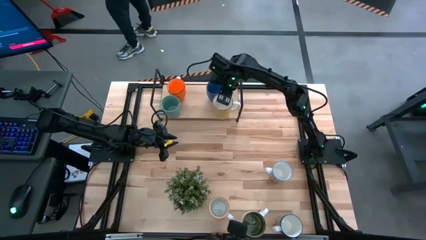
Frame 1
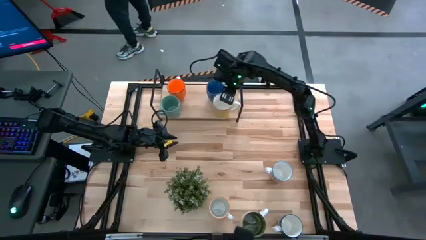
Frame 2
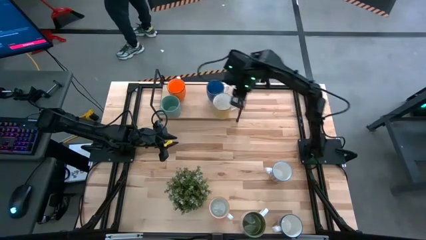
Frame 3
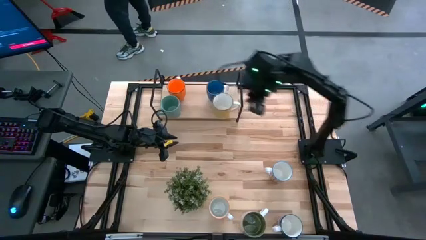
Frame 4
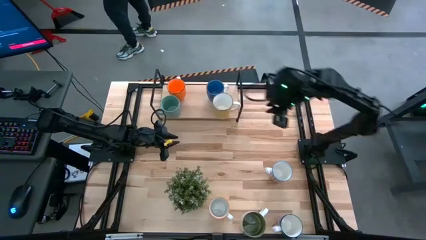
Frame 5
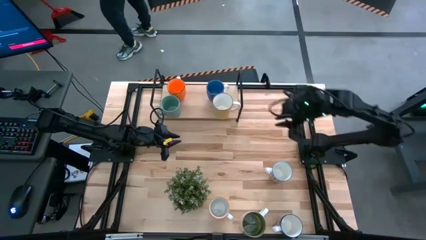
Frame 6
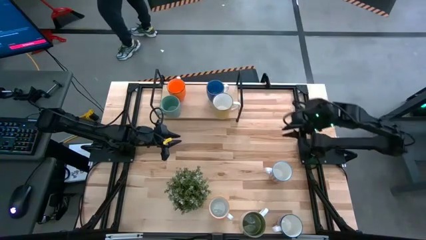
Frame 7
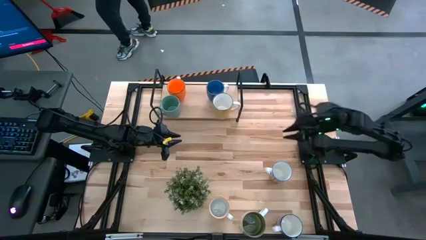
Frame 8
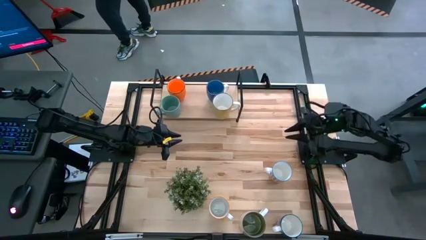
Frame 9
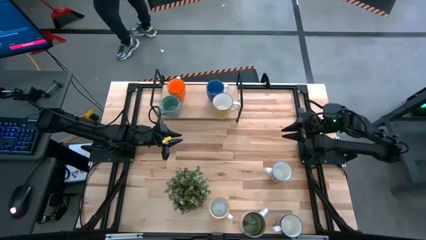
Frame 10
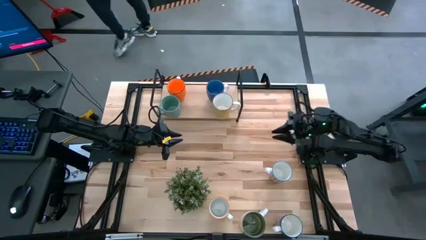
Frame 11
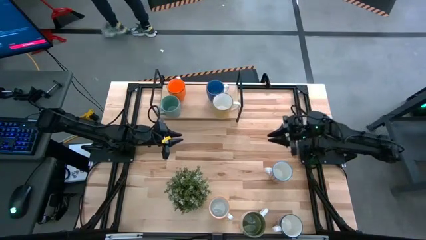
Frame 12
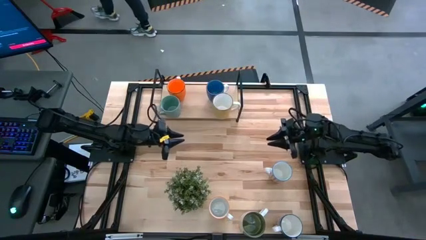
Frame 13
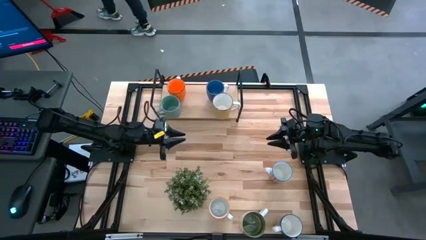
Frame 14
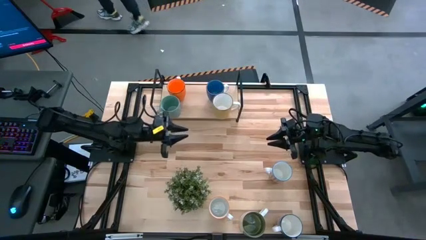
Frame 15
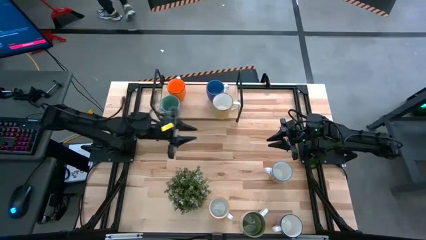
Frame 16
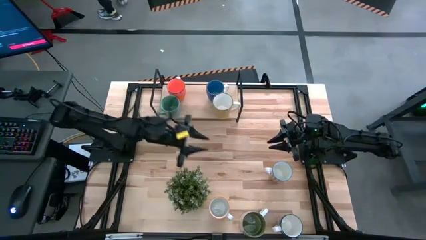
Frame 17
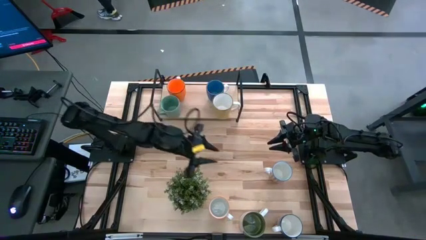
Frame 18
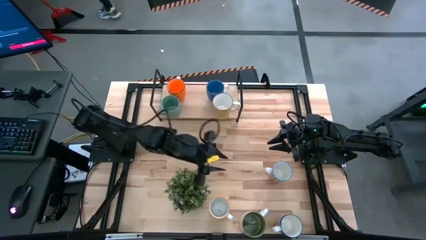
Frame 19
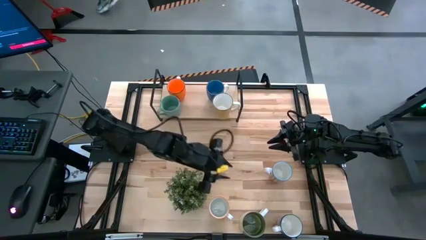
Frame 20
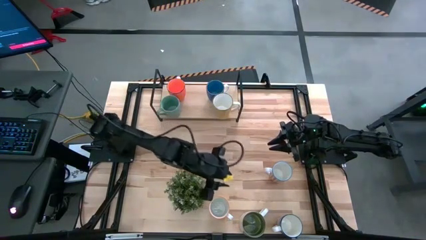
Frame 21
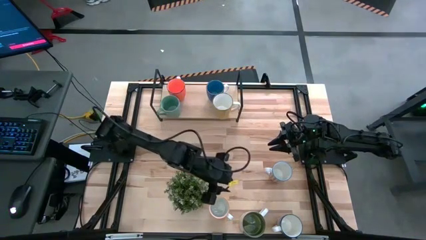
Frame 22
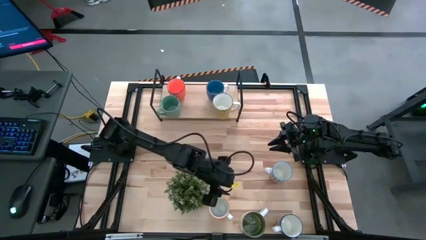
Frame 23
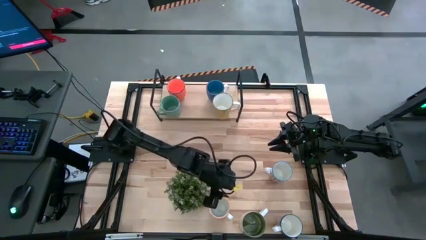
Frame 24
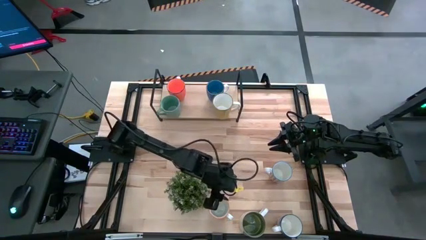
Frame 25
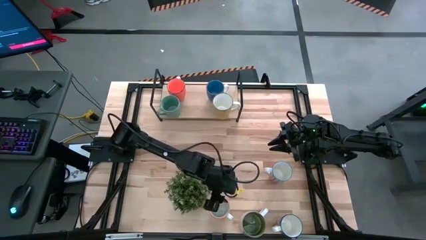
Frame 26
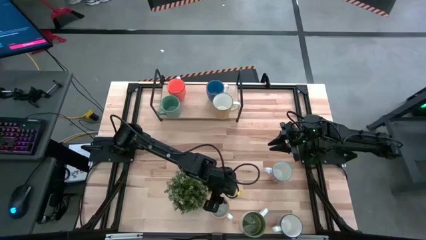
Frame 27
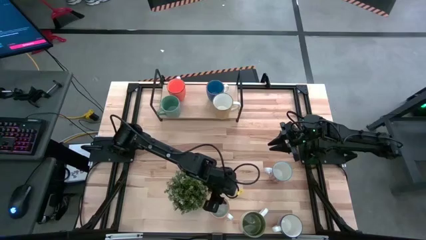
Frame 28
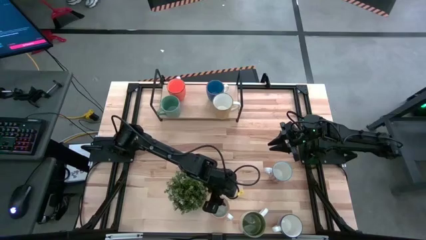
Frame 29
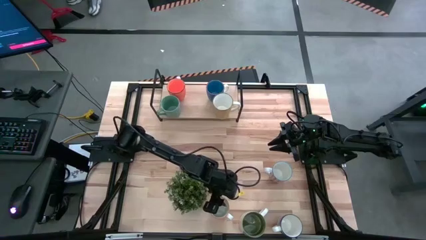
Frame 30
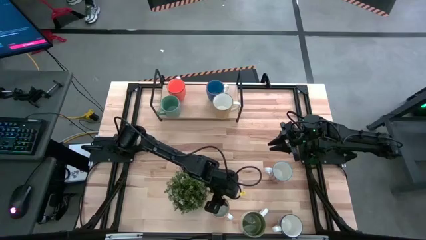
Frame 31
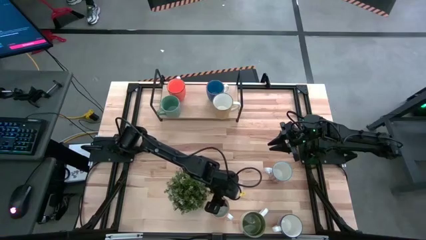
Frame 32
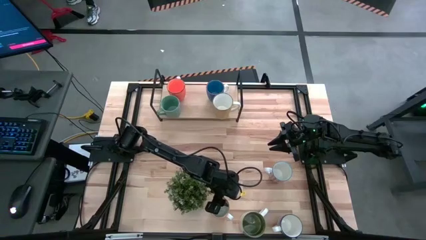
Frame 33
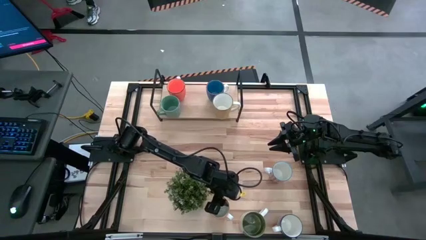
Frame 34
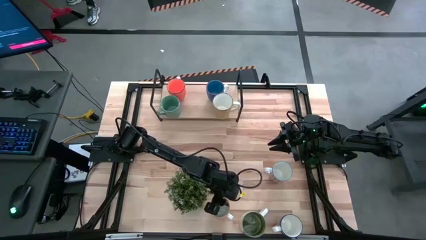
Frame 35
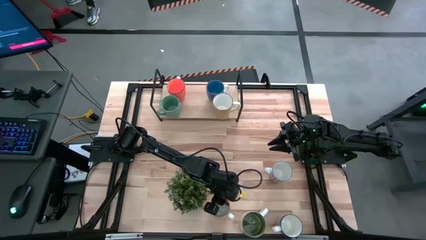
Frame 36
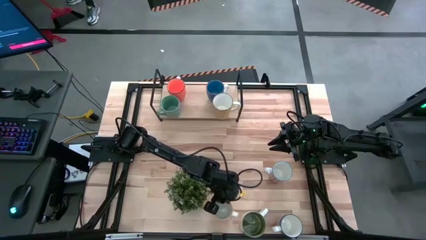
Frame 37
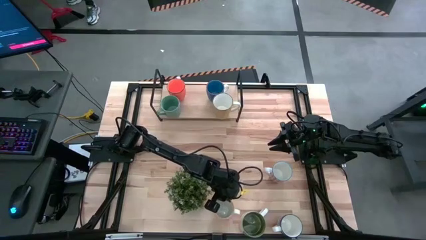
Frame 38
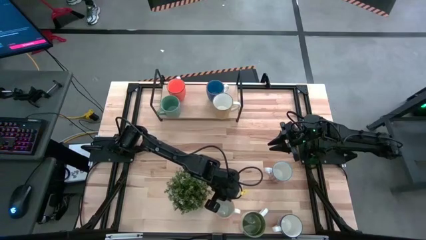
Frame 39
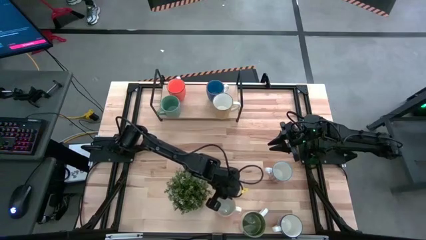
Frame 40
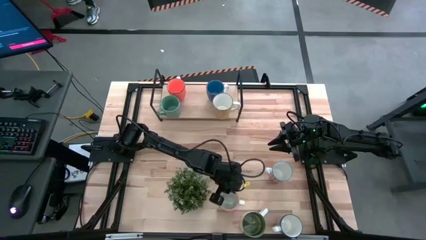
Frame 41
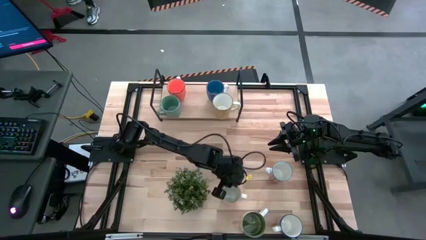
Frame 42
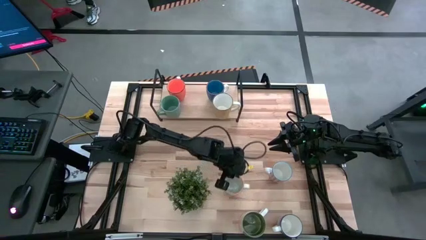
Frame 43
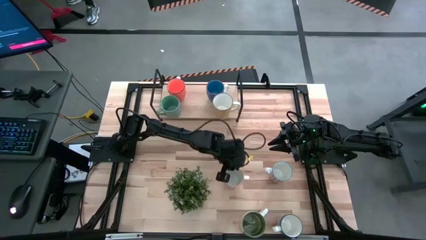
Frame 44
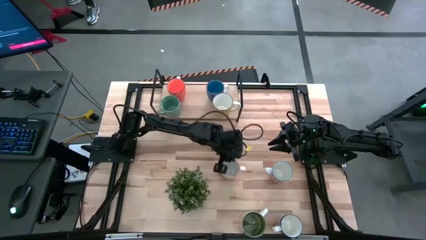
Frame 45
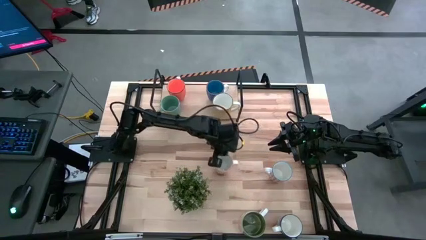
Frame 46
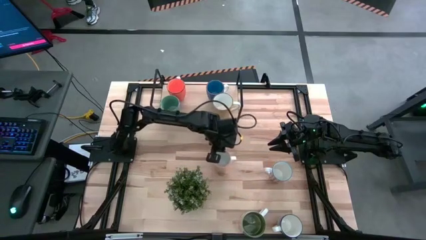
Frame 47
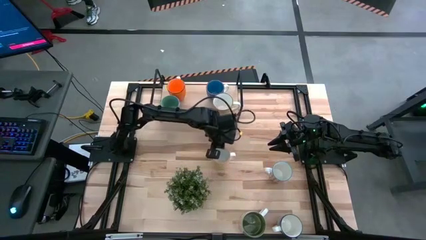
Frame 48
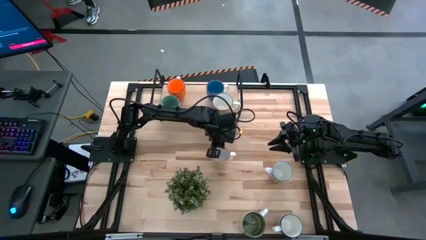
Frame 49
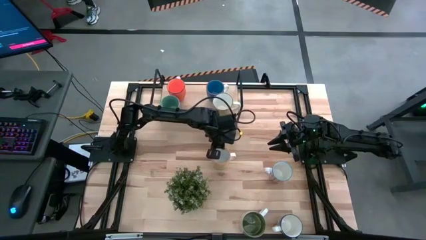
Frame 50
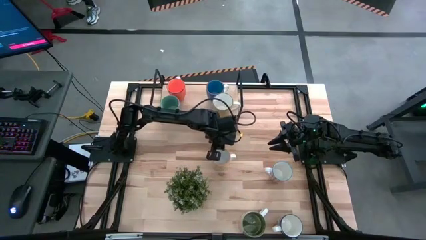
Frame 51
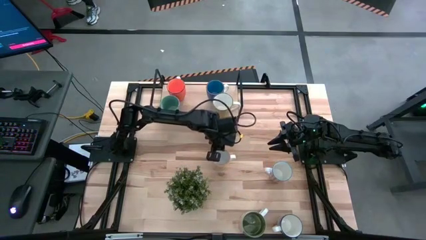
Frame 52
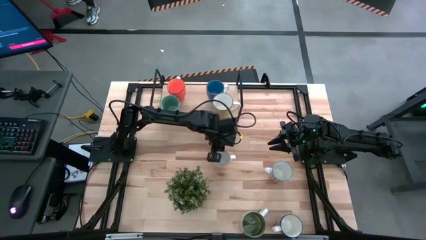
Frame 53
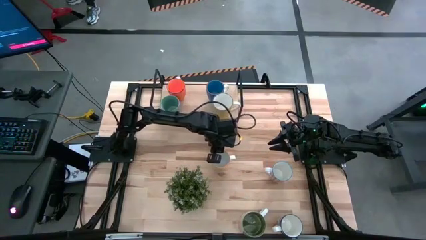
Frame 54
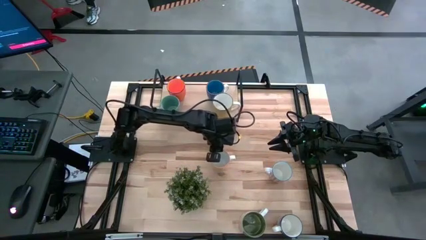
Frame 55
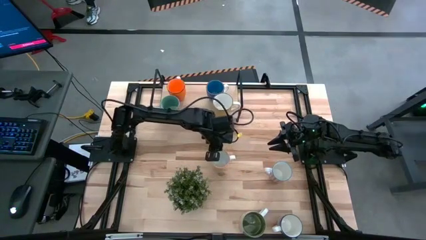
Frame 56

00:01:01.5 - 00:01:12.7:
Task: Place coffee mugs
Put the yellow patterned mug on the shelf
